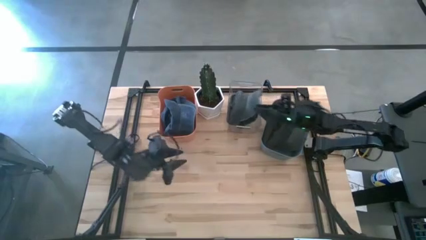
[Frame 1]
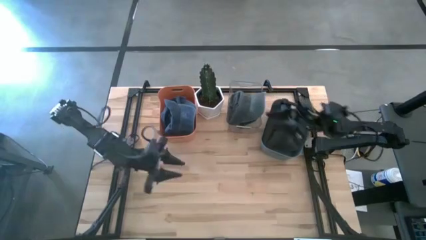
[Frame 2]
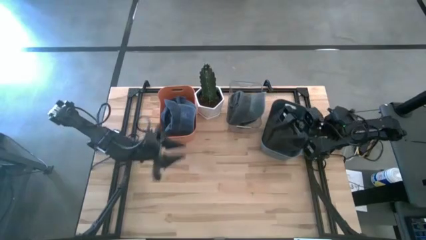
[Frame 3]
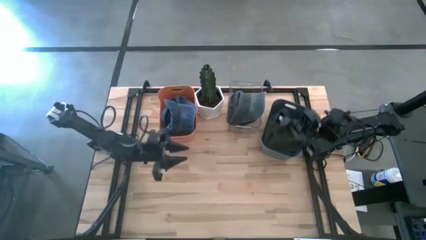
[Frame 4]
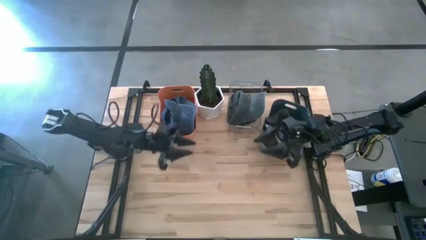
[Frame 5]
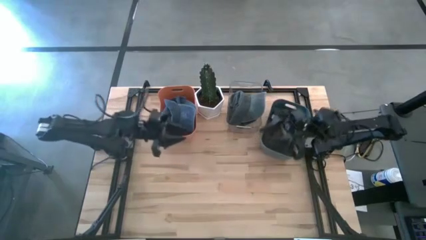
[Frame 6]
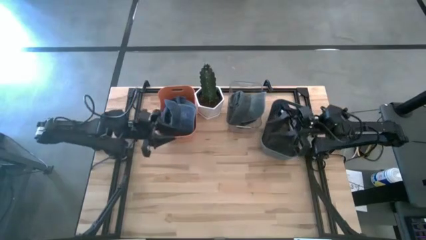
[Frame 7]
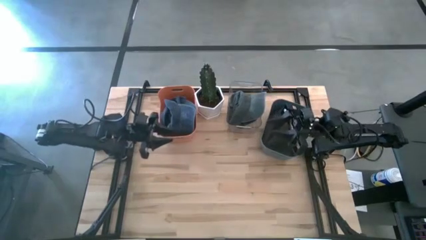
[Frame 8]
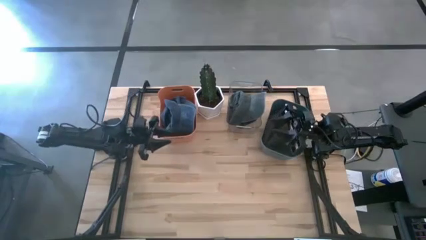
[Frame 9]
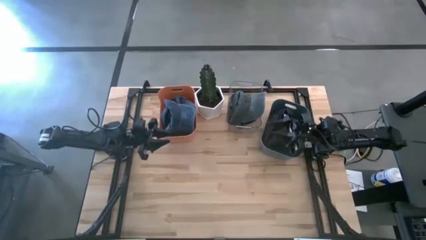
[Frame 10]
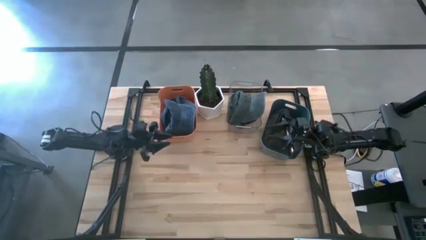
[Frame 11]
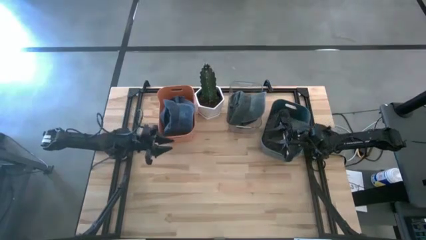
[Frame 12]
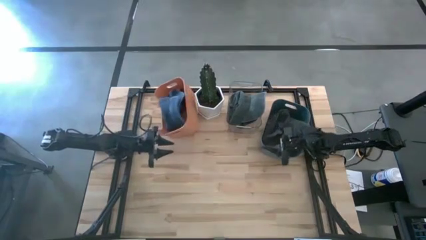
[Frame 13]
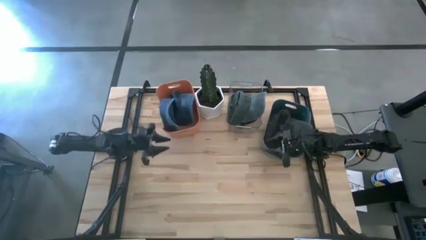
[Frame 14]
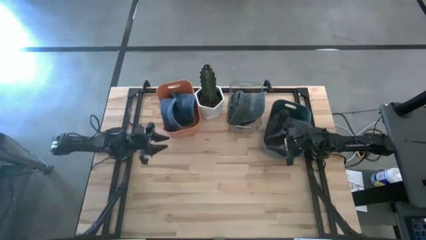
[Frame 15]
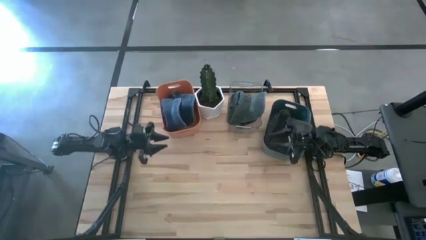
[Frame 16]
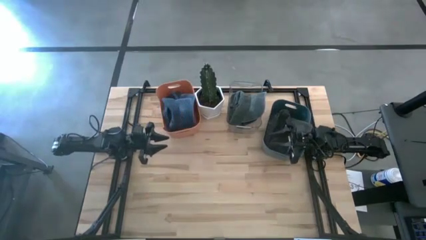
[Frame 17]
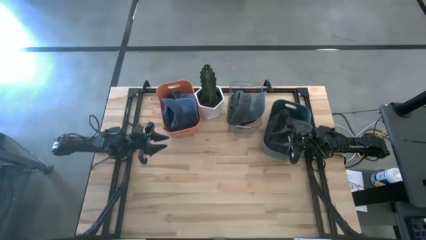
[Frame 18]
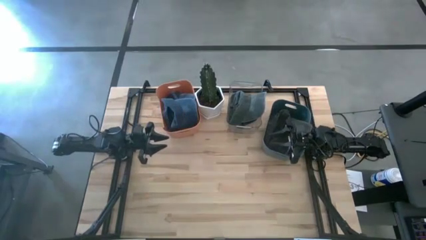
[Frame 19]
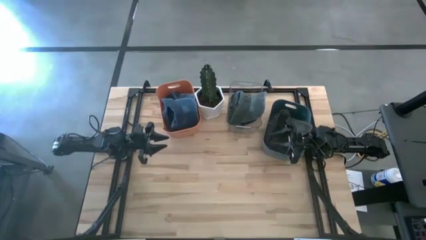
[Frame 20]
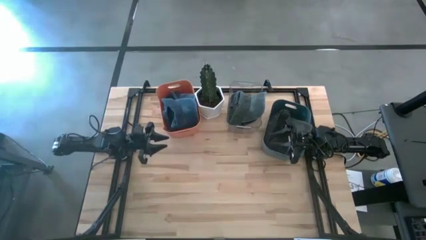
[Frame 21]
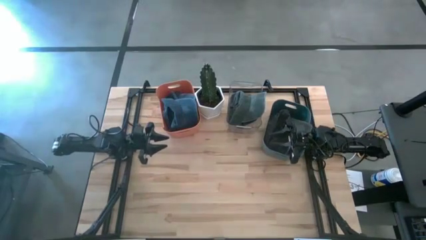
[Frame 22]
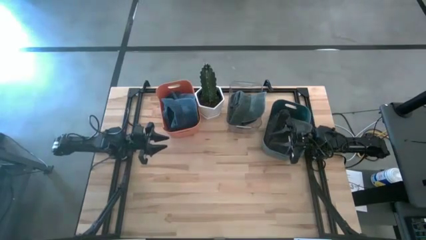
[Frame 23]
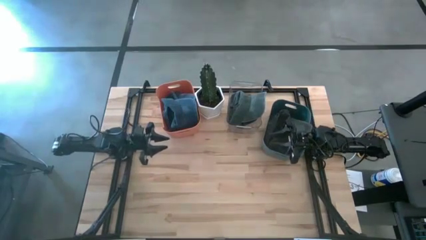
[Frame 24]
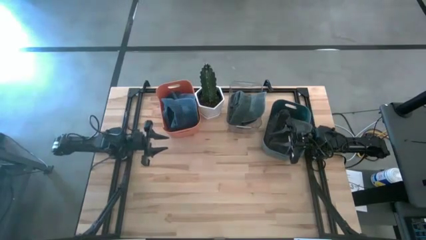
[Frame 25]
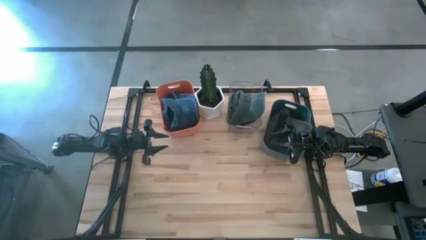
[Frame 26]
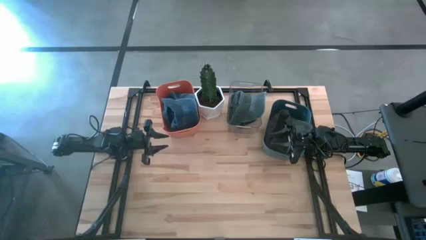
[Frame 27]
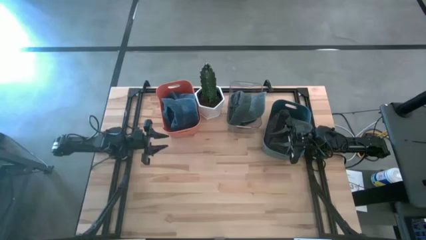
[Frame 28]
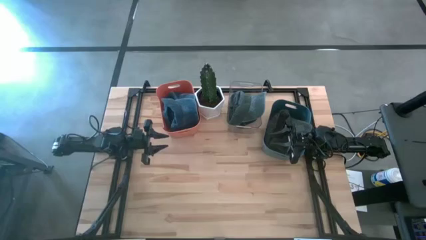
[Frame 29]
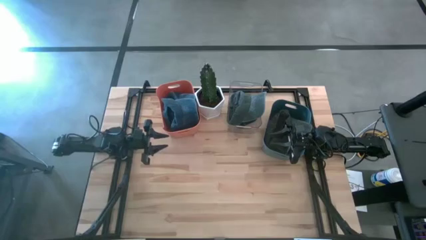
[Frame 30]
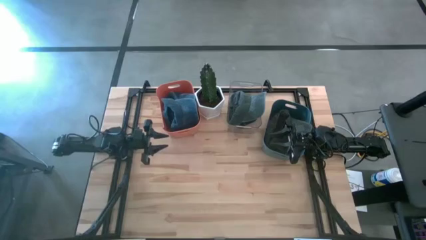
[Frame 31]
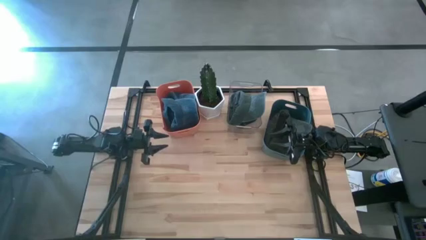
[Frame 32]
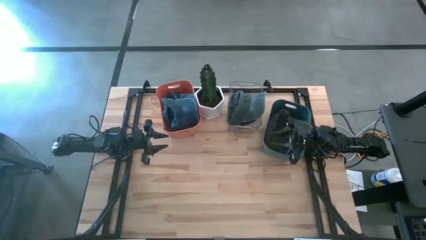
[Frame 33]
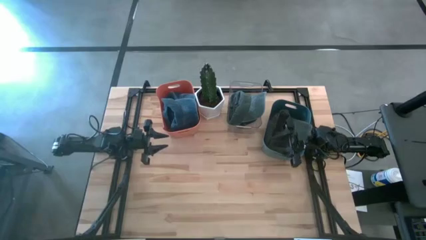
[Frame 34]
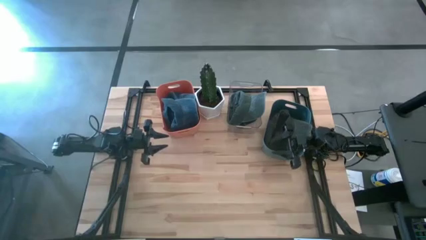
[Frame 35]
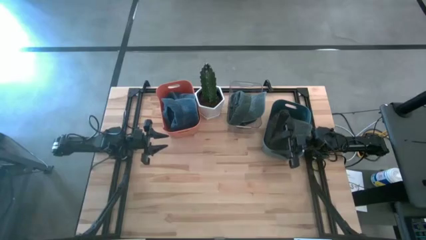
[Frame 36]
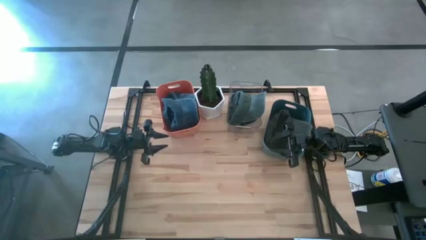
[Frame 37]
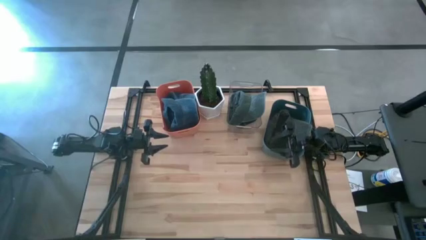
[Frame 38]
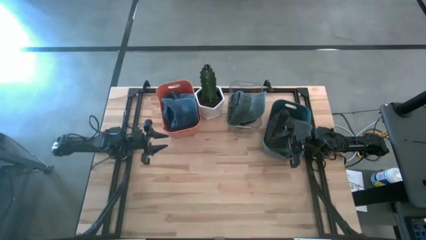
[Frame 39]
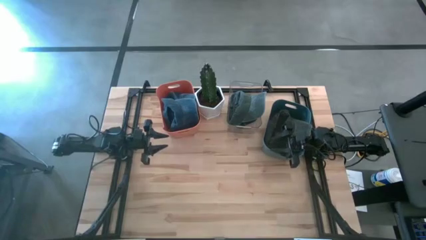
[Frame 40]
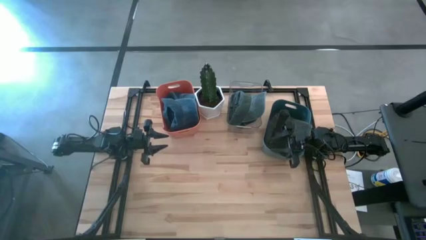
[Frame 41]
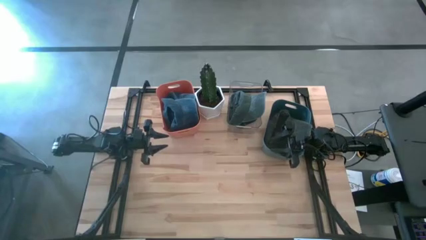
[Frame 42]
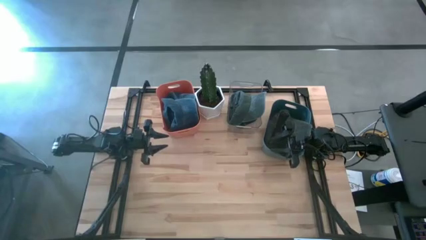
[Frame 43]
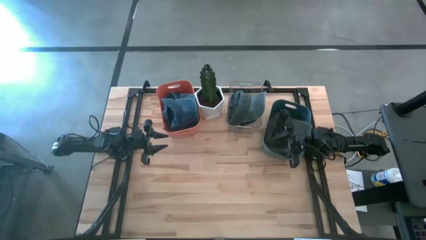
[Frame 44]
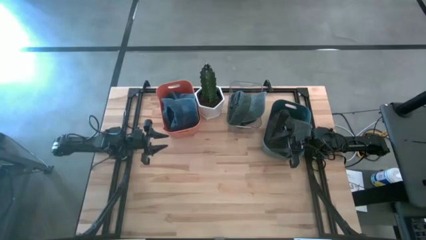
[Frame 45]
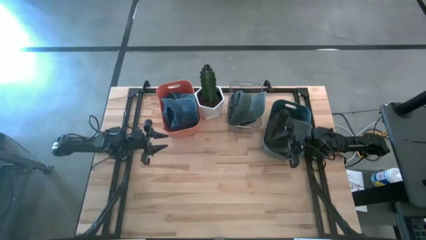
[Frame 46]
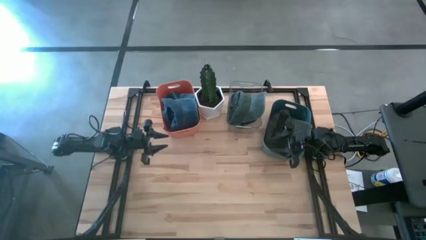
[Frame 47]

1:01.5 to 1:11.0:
Task: Pick & Place hat
Return to Home Position

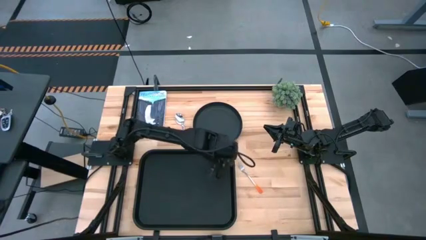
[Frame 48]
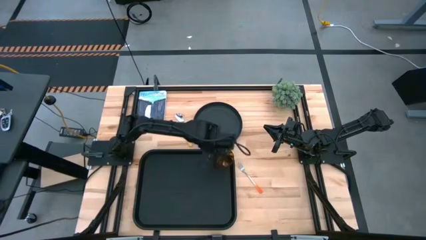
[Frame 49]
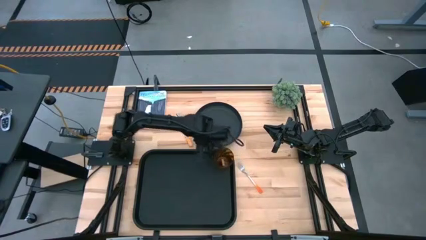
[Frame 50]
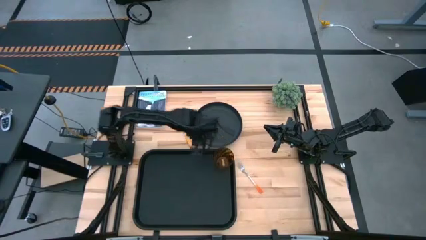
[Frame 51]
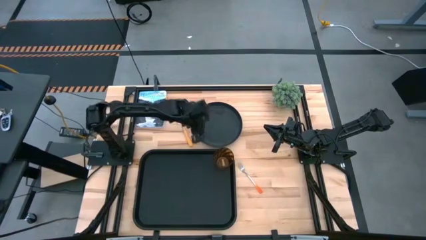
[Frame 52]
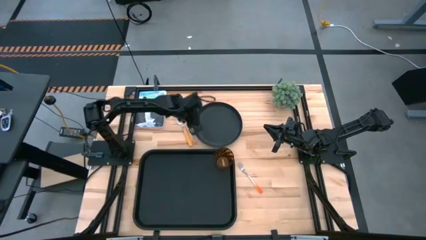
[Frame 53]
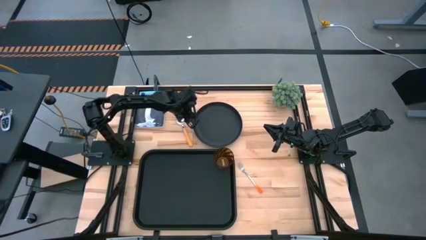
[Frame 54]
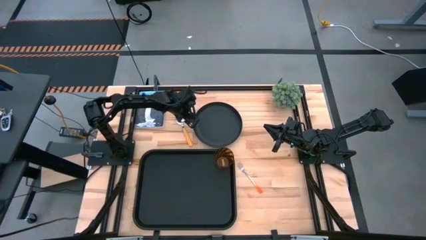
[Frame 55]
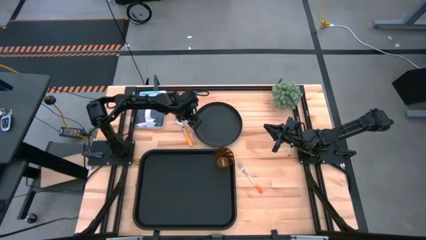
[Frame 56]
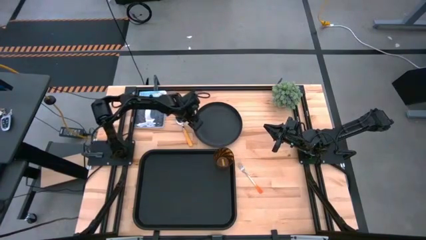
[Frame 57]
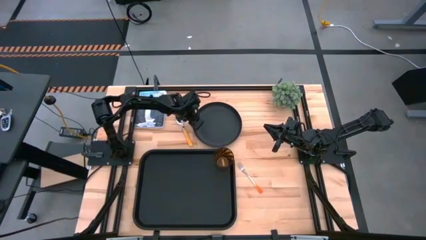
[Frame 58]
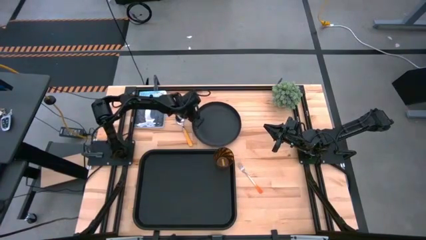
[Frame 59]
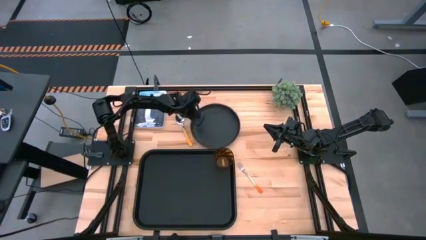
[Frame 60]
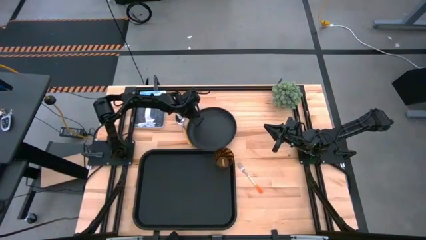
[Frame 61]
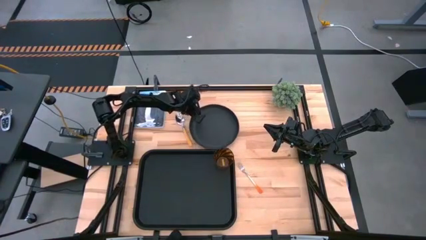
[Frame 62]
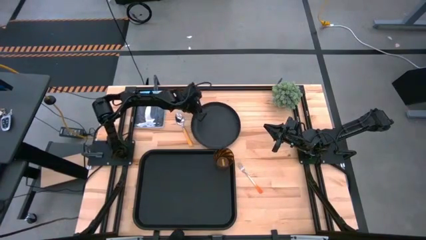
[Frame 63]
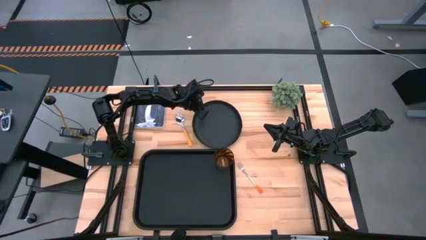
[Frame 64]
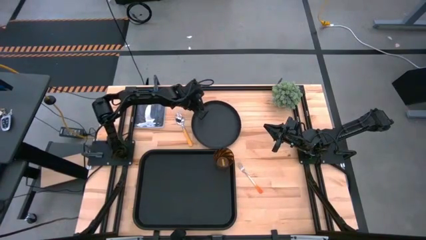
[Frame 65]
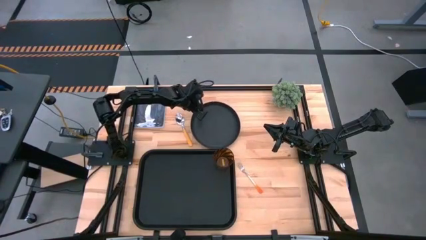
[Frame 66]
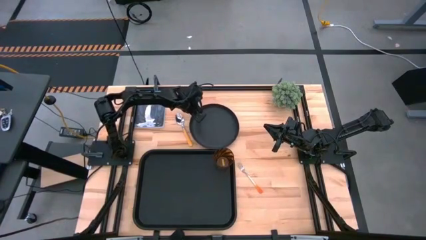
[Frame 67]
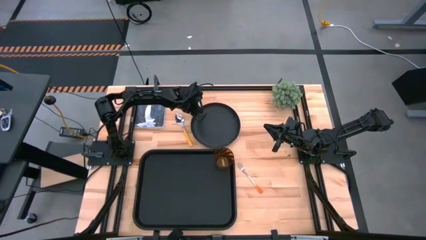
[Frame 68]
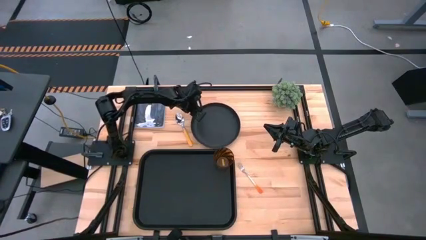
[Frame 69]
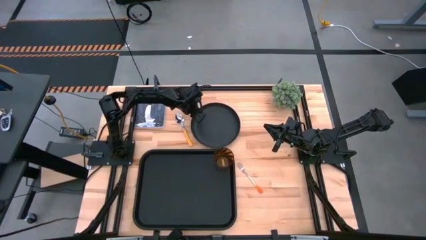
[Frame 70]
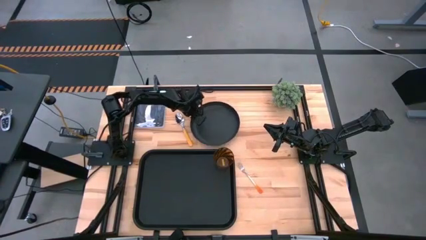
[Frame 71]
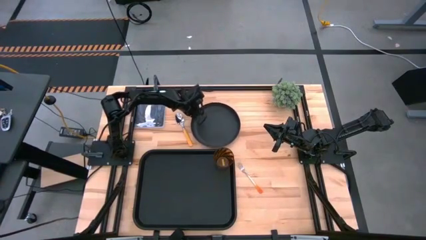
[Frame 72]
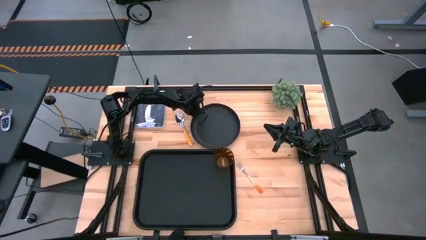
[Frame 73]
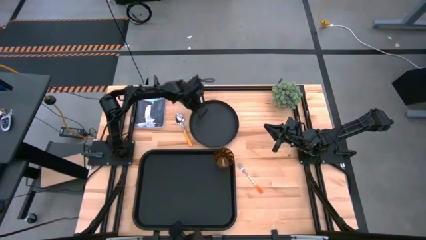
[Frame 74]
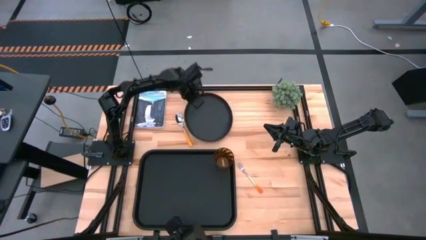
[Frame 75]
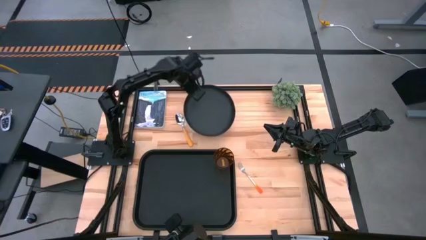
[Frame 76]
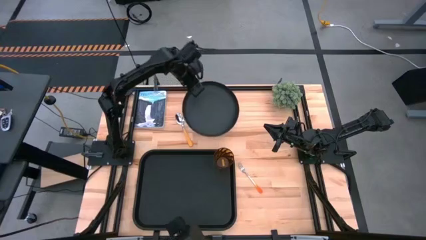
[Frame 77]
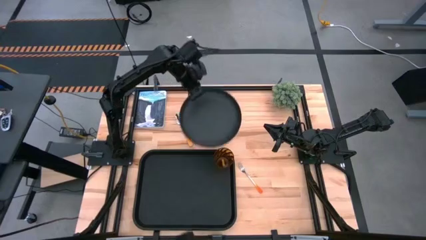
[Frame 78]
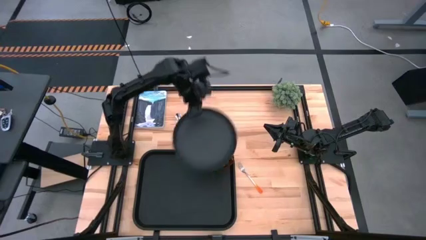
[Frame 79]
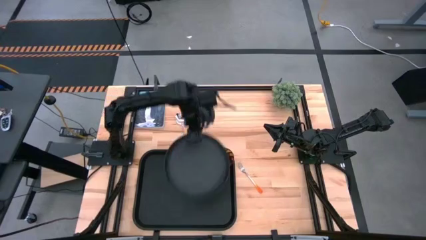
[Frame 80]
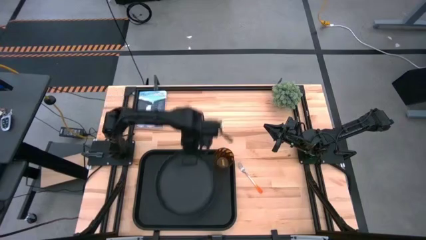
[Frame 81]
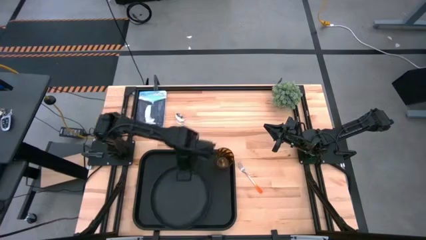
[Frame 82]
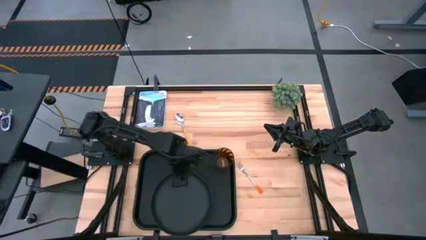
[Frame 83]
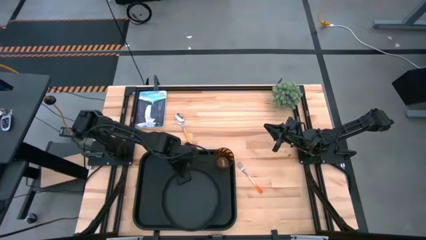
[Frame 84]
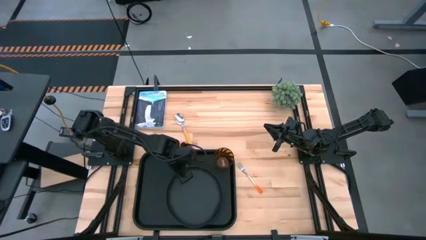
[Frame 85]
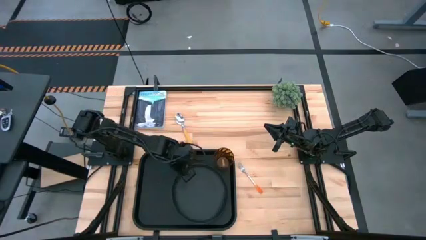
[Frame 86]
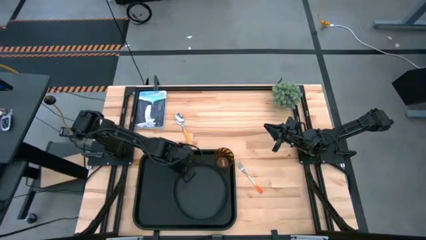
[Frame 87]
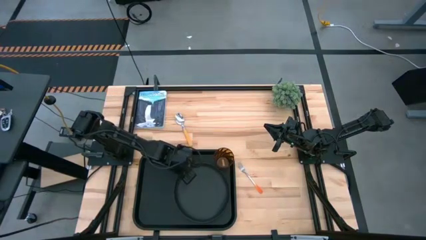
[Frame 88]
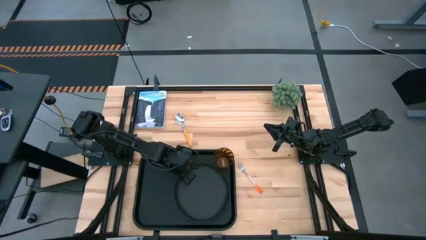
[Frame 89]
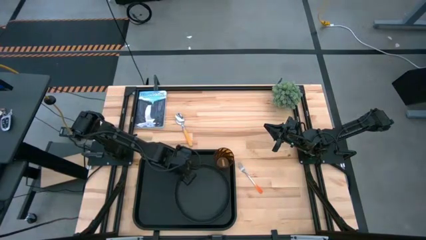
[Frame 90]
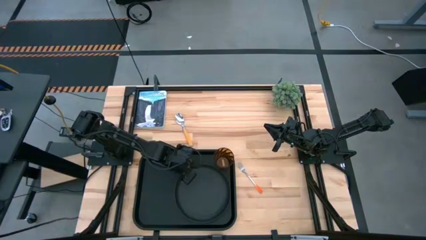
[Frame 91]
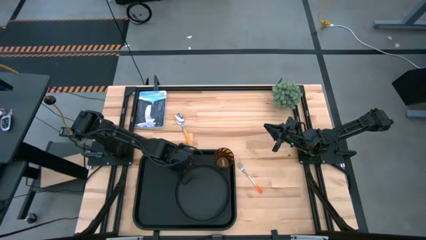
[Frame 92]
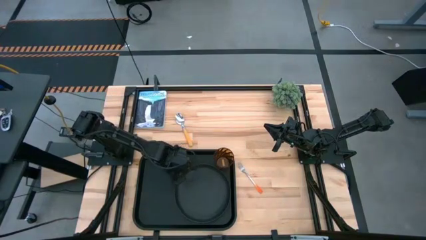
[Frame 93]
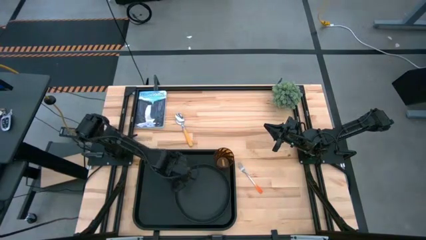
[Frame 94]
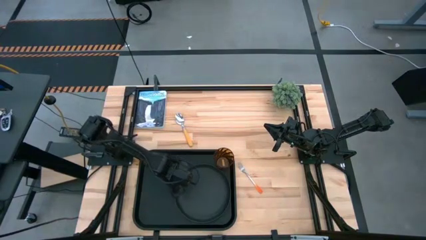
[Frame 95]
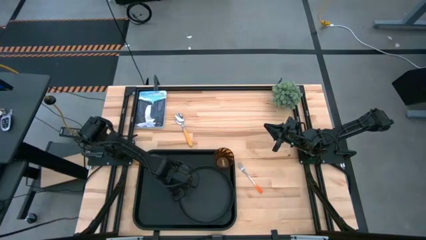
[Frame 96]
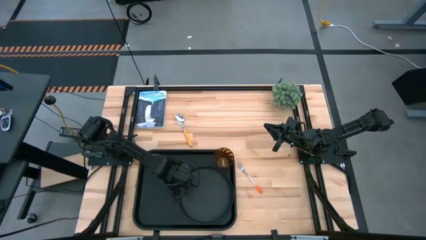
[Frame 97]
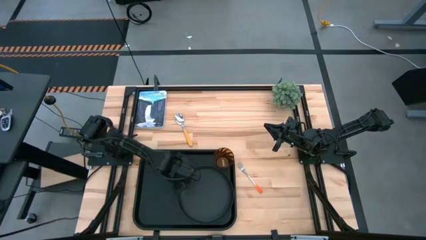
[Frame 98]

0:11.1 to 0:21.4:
Task: Pick and place plate/cup/fork/spoon on tray
Put the black plate to the bottom of the brown cup on the black tray
